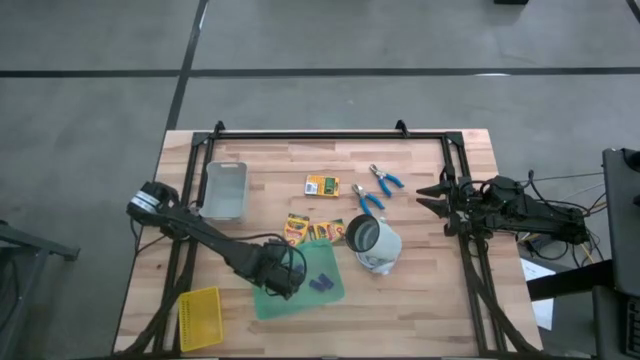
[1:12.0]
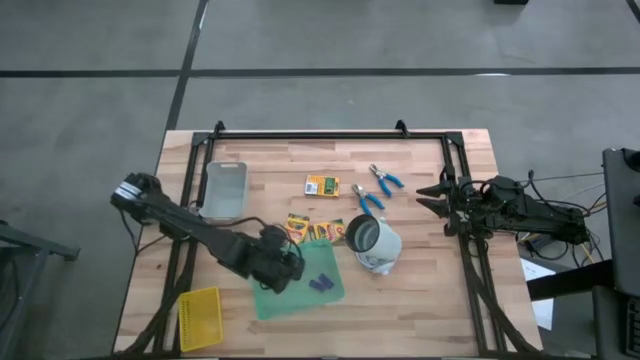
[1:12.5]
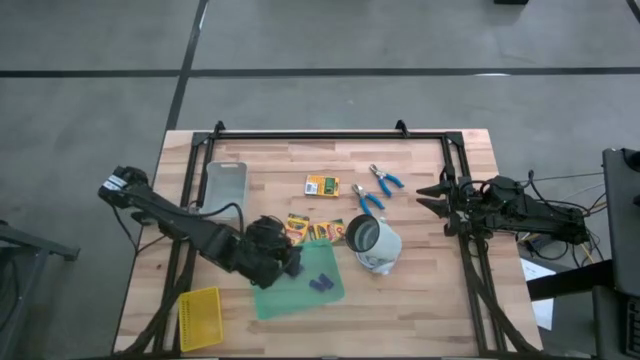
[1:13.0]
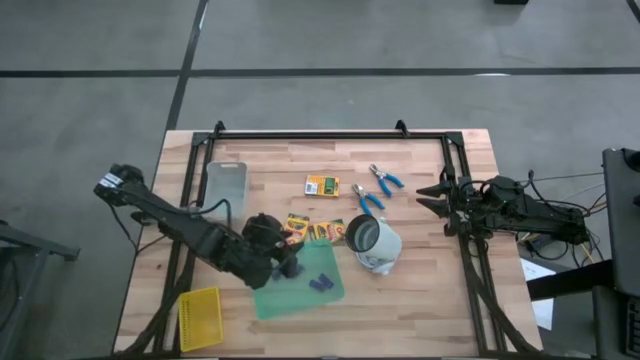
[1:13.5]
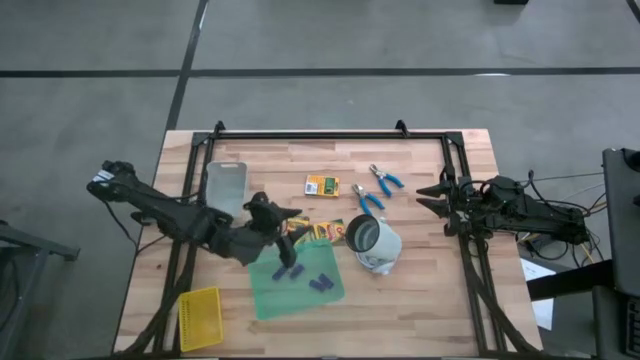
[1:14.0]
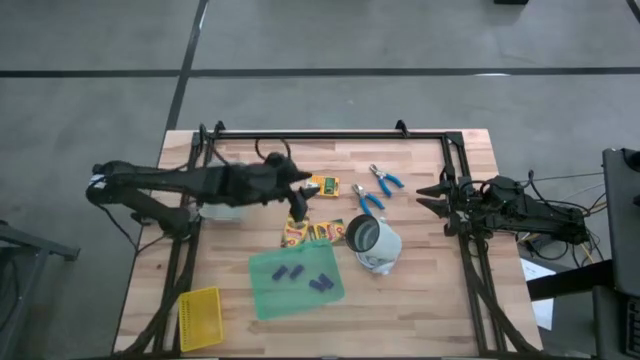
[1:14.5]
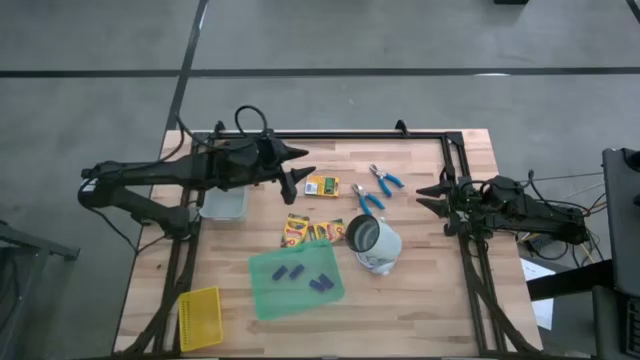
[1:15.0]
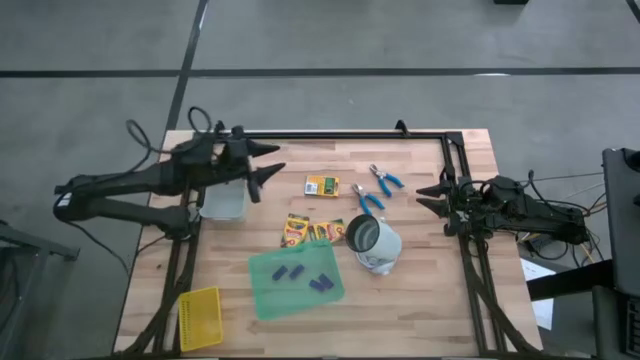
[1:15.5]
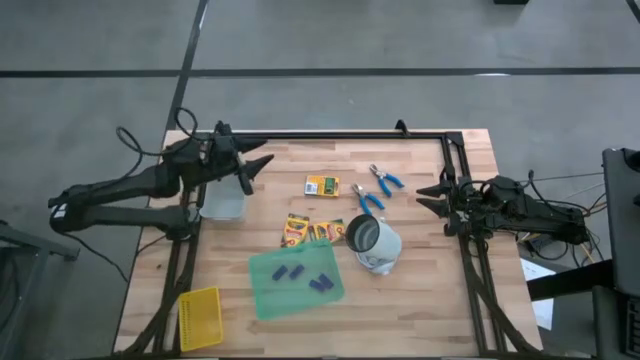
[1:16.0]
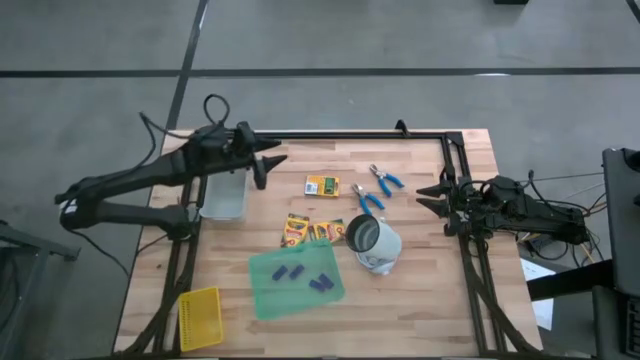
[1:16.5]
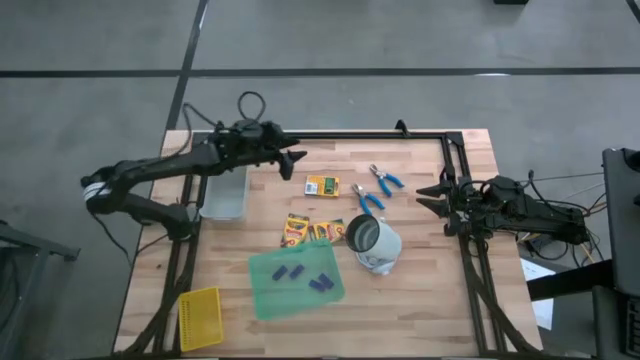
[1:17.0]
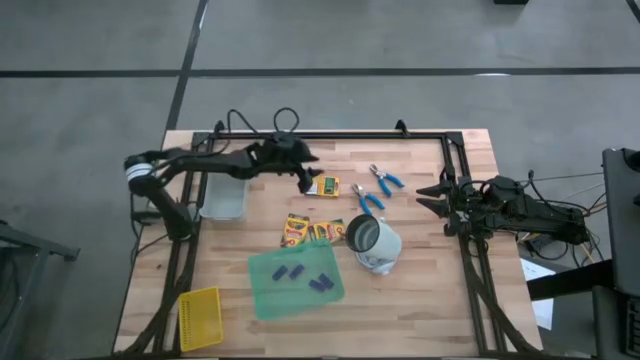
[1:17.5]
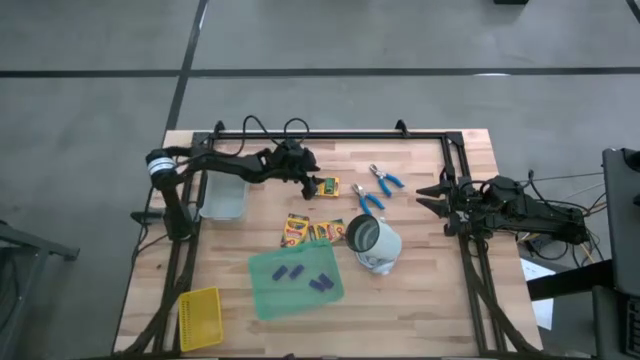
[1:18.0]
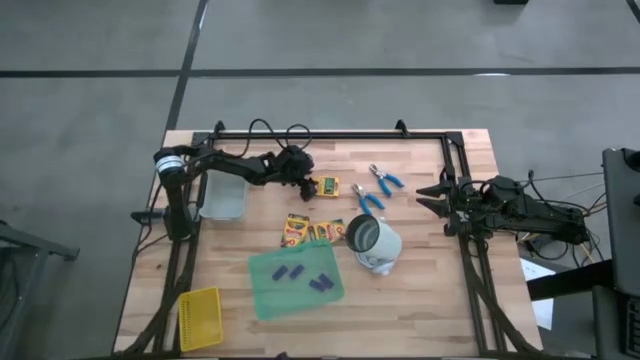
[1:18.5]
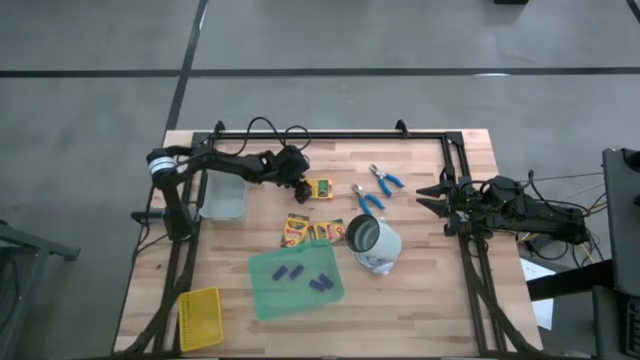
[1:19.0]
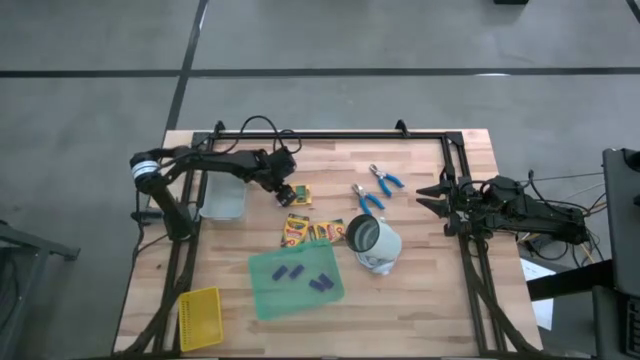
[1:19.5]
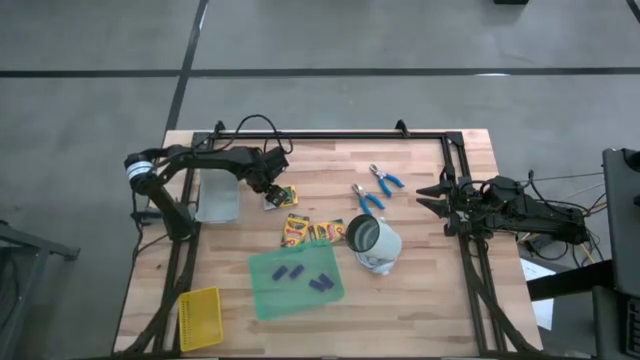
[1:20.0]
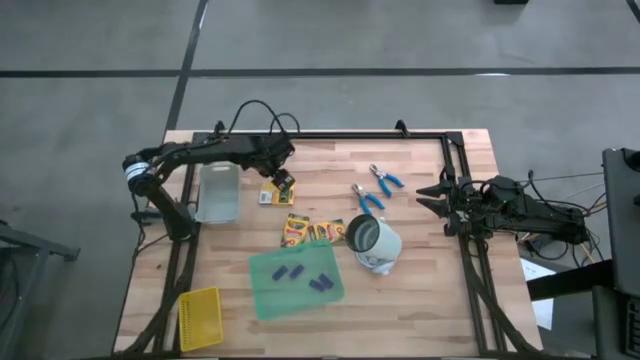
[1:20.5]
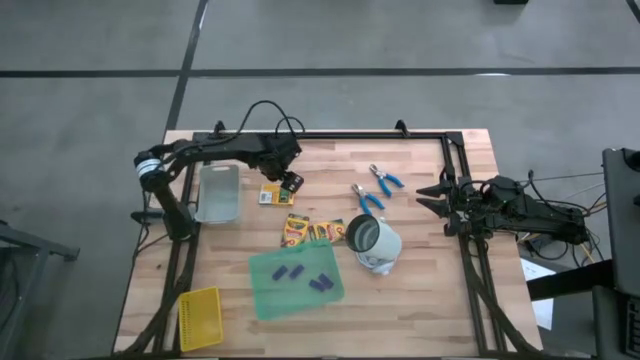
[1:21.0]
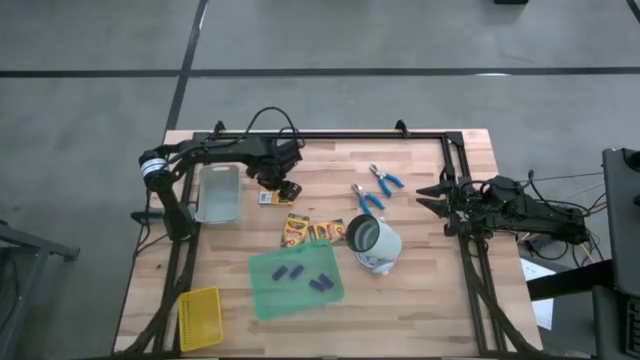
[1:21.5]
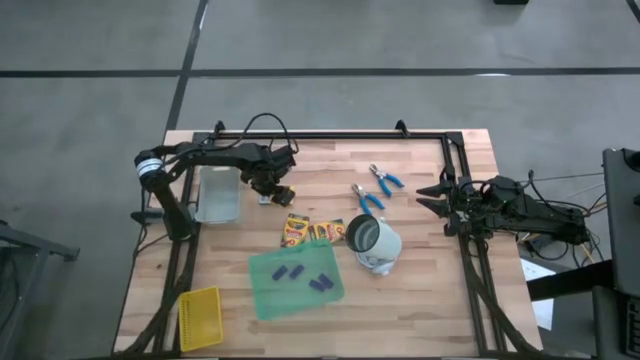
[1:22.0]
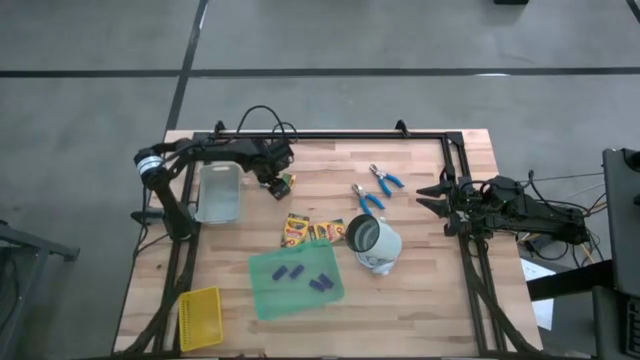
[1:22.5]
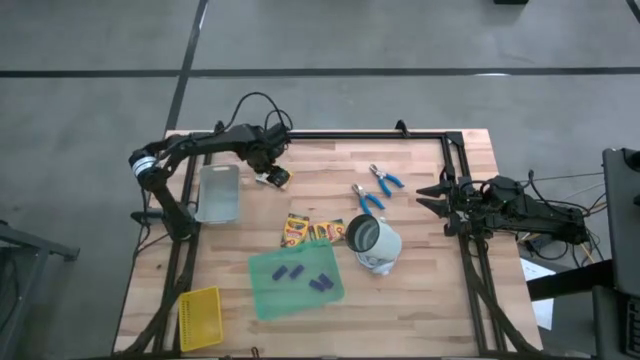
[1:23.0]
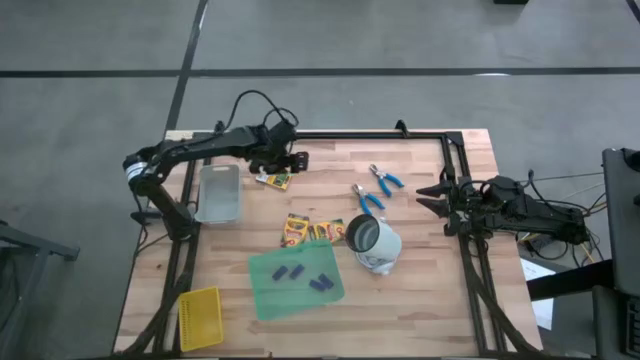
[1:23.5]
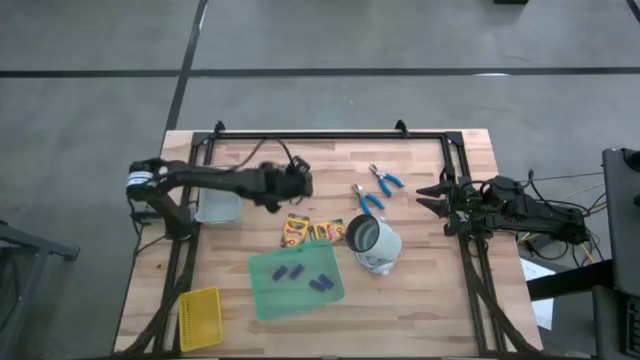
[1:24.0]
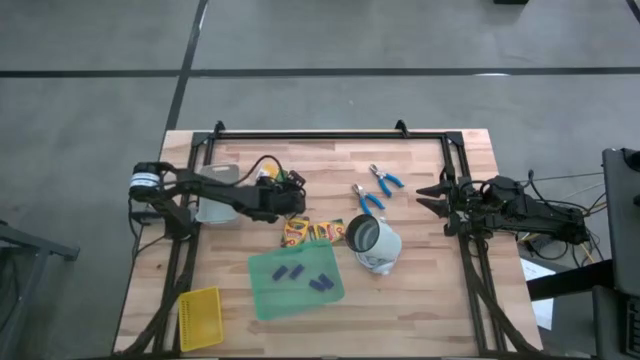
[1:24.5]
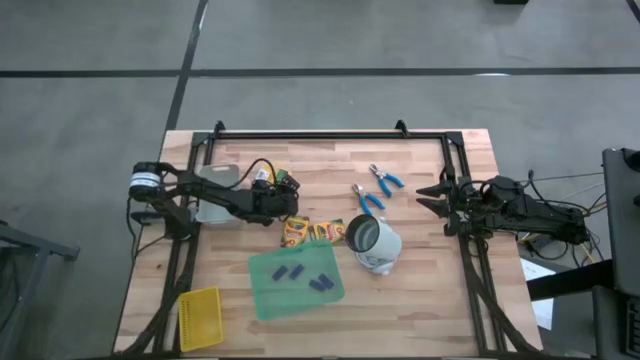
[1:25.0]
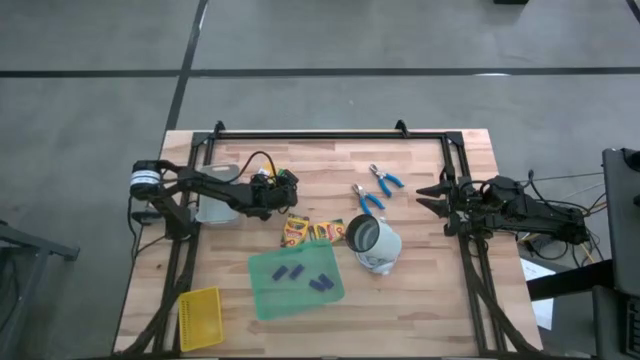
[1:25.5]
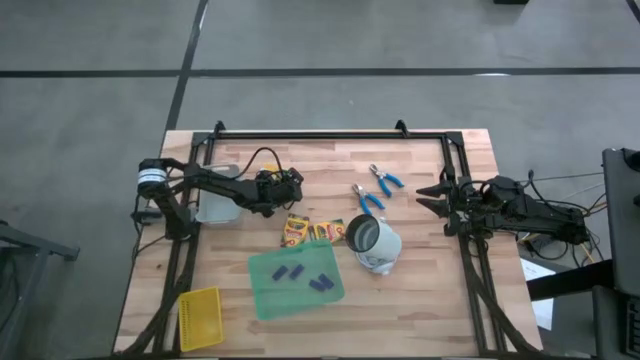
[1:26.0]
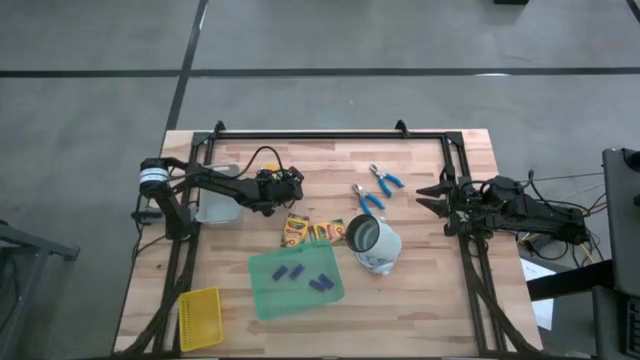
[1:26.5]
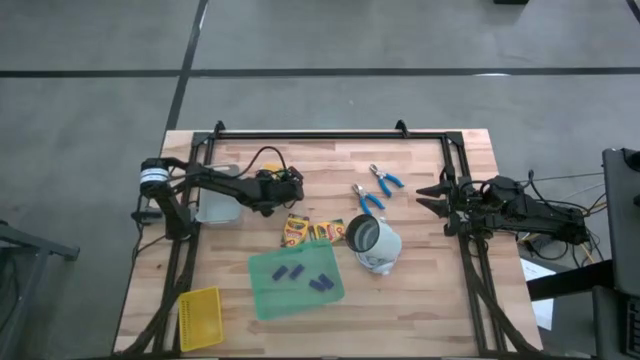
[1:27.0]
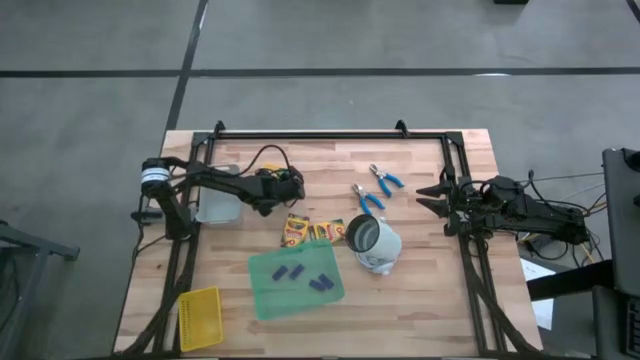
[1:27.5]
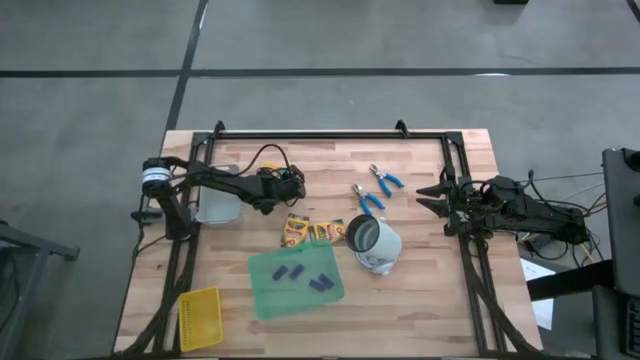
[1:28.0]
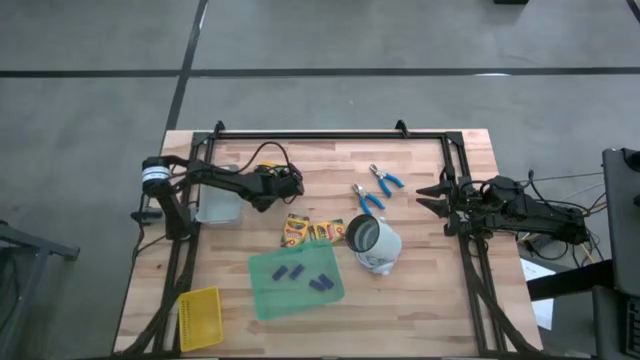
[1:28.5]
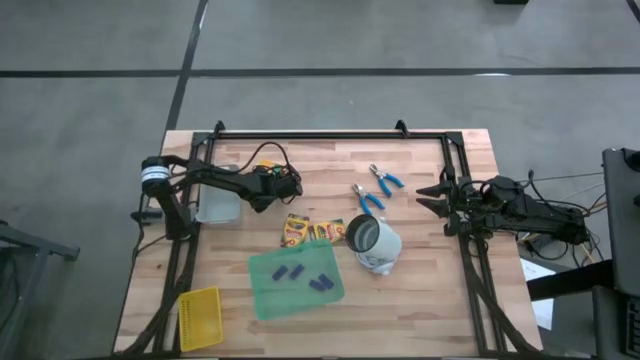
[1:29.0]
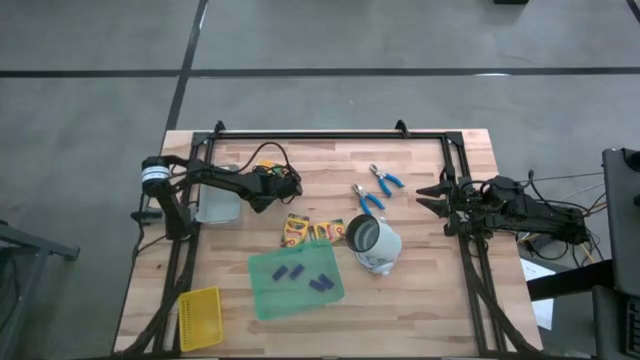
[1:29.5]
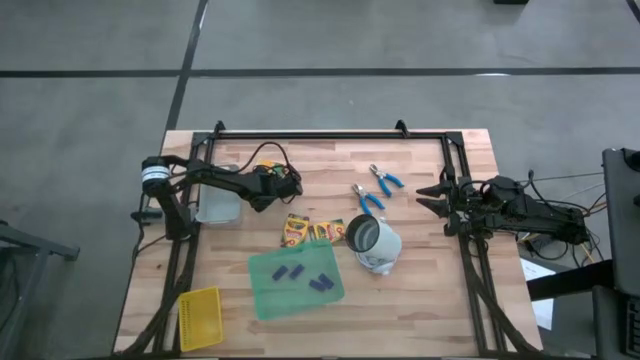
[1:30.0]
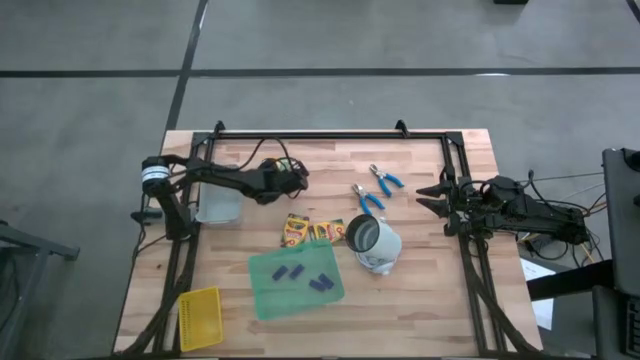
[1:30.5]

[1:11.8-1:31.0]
Task: Pick & Place School Supplies
Put the yellow crayon box into the gray bin

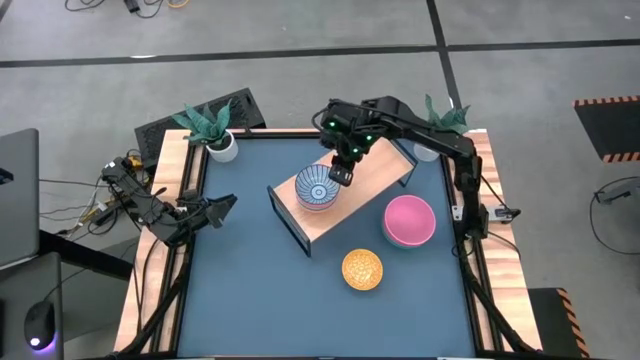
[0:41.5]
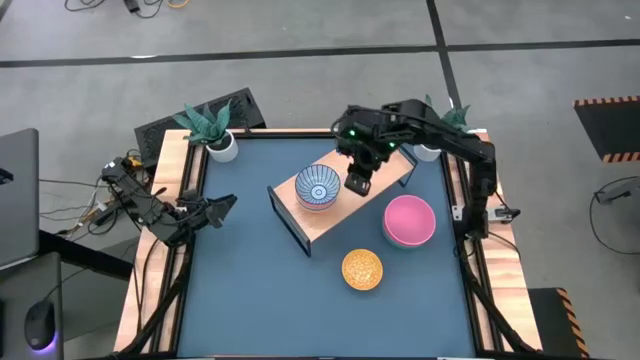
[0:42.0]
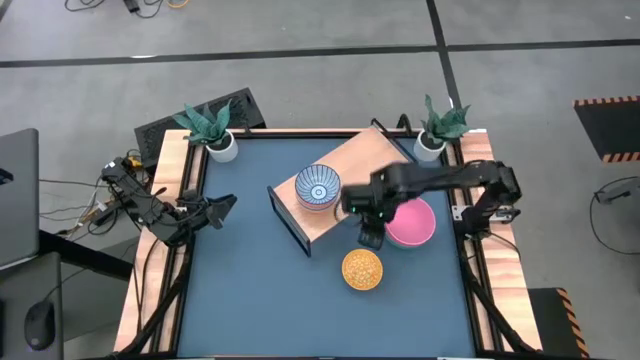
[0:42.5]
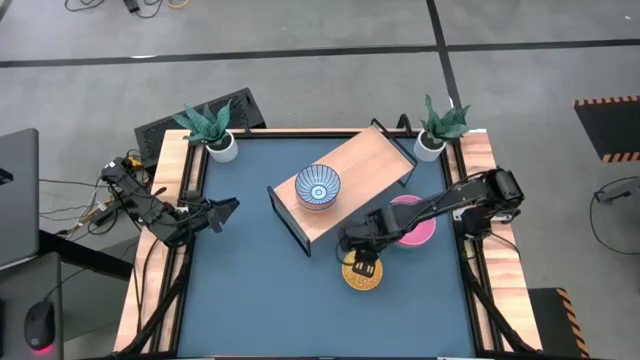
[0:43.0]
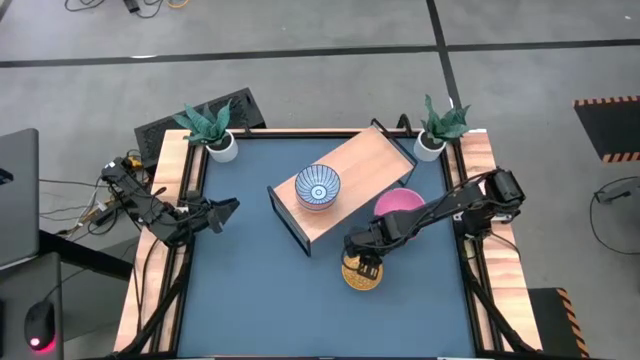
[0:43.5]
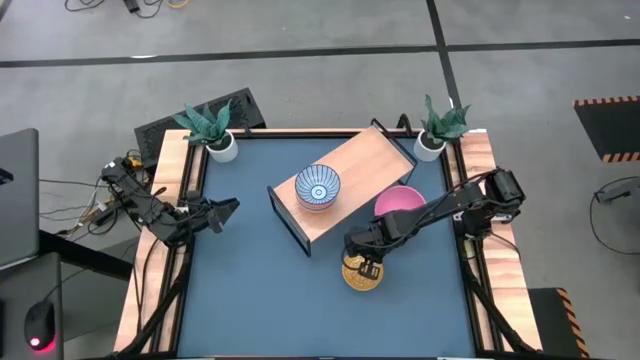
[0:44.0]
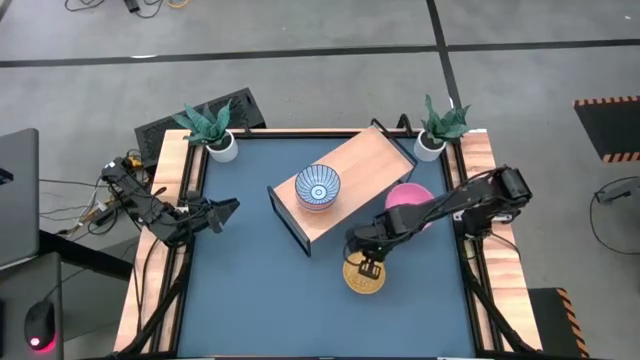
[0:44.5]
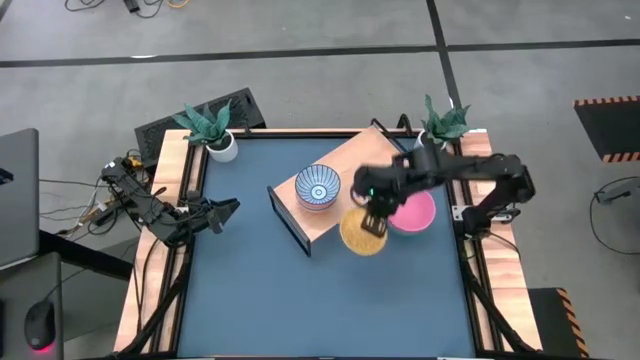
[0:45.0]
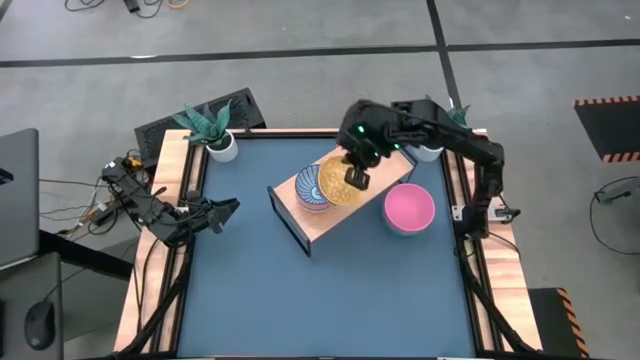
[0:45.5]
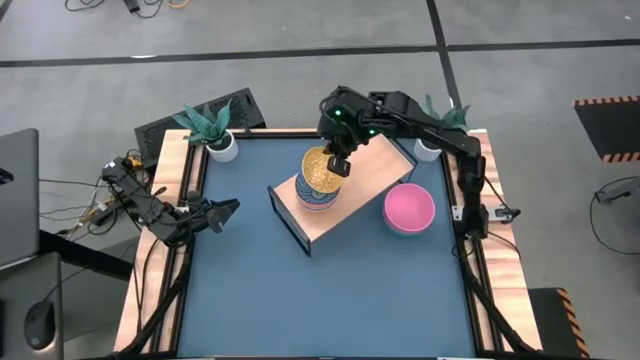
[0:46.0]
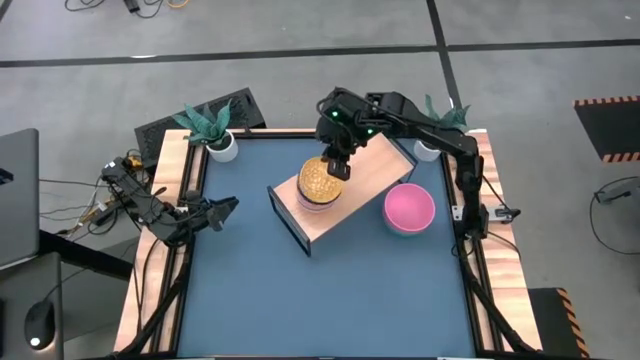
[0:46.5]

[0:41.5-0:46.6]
Task: Place and stack bowls onto a shelf
Stack the yellow patterned bowl on top of the dark blue patterned bowl on the shelf
